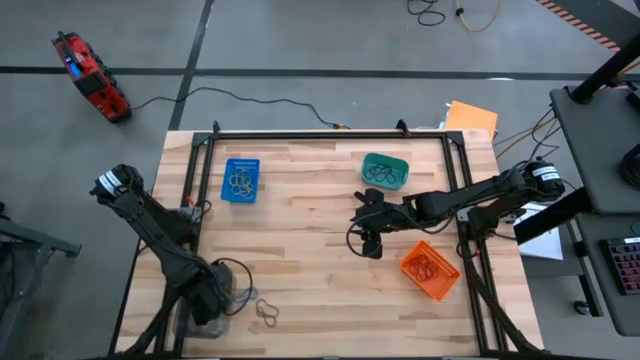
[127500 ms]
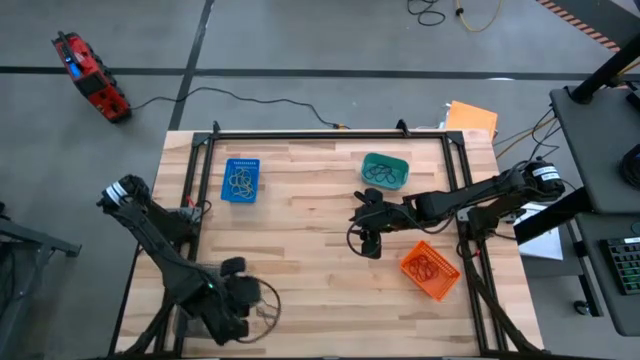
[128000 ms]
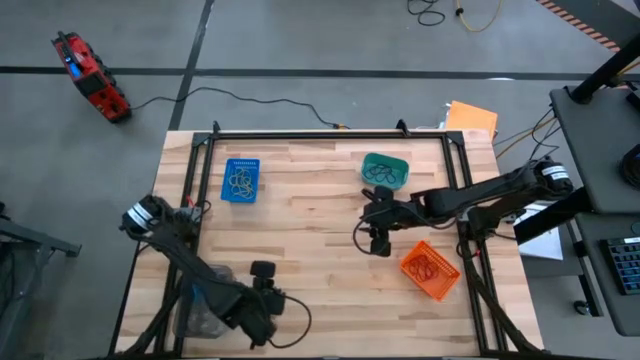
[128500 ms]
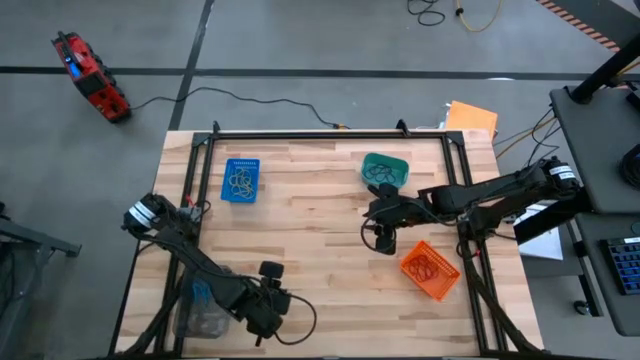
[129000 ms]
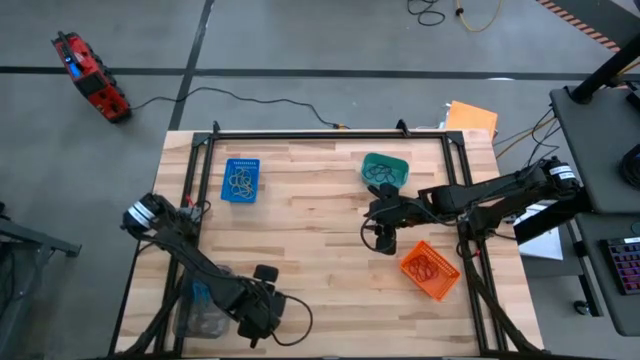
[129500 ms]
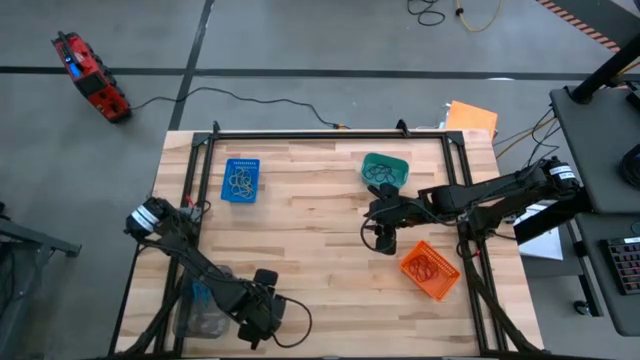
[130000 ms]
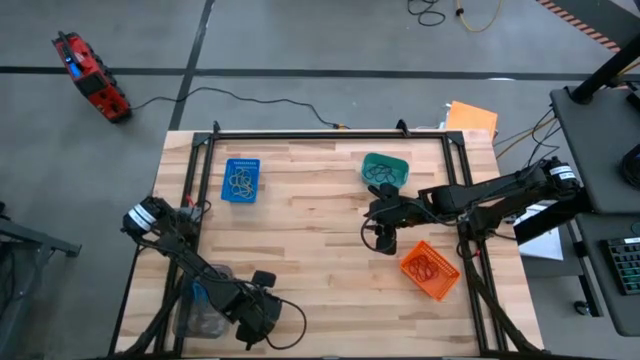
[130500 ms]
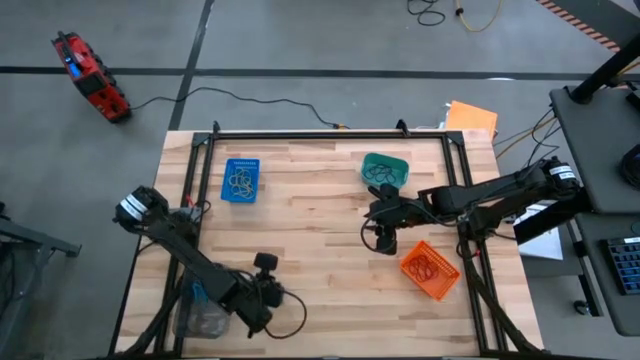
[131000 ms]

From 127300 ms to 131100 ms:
Task: Sort rubber bands into baskets
Put the violet rubberband into the green bin

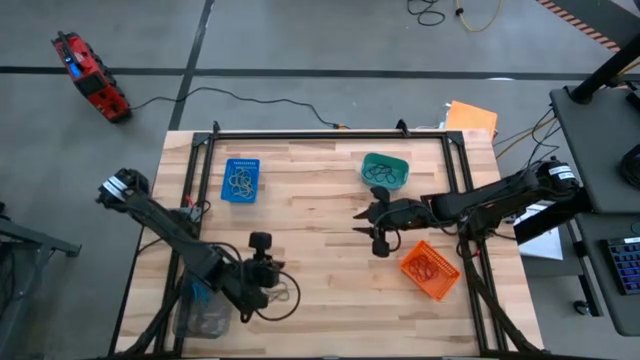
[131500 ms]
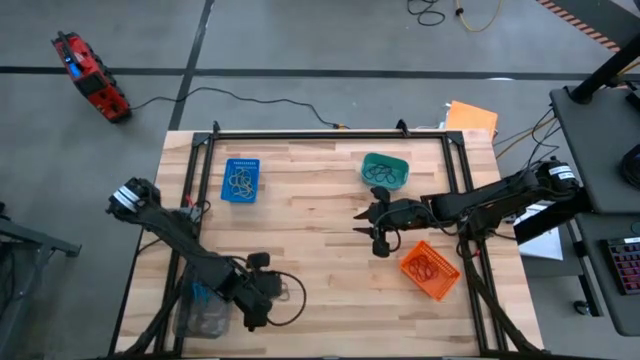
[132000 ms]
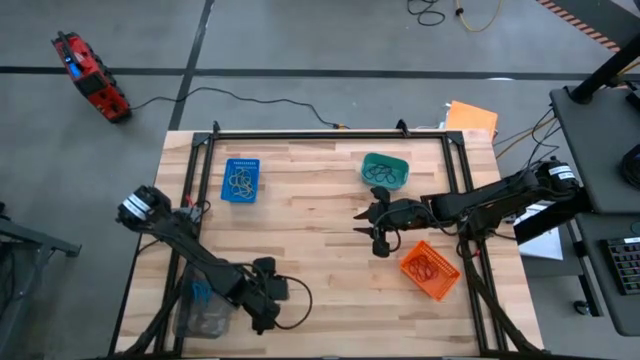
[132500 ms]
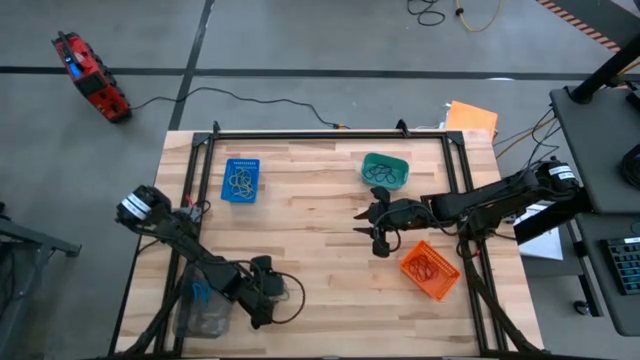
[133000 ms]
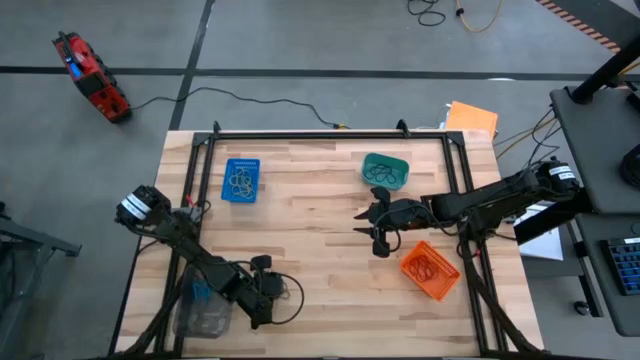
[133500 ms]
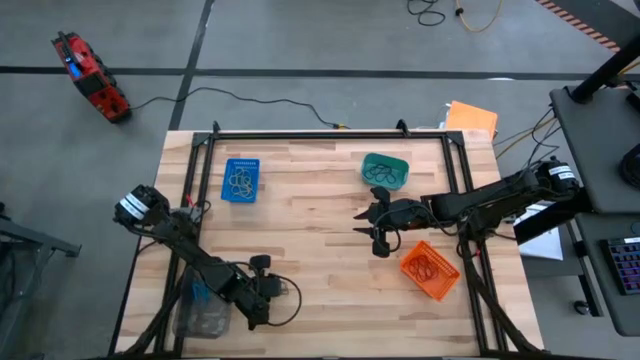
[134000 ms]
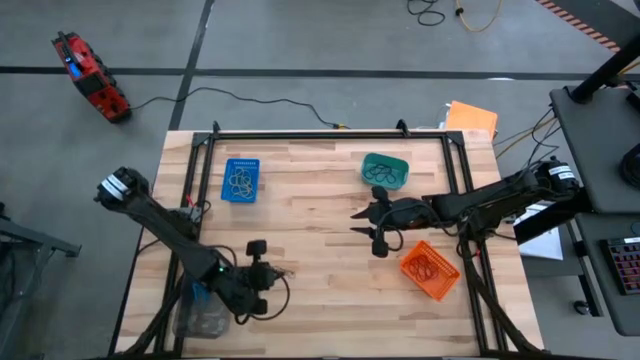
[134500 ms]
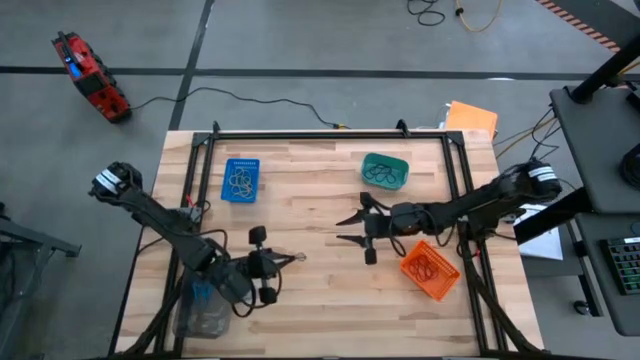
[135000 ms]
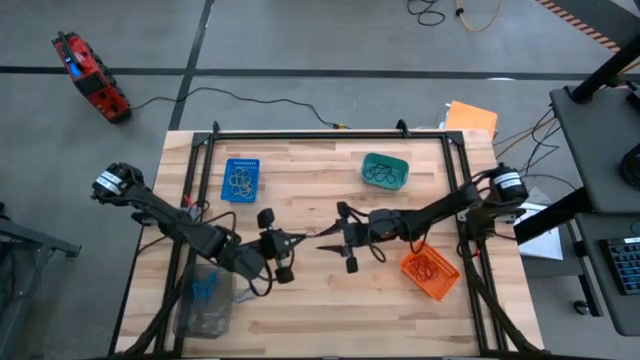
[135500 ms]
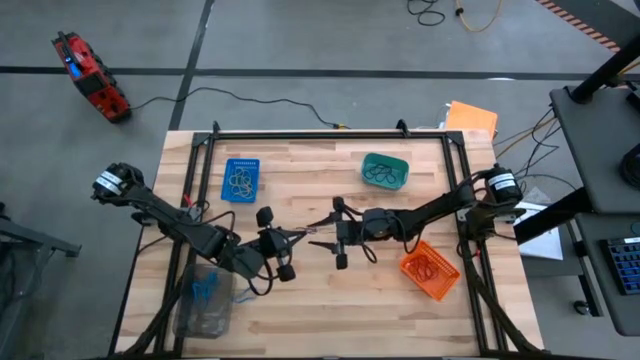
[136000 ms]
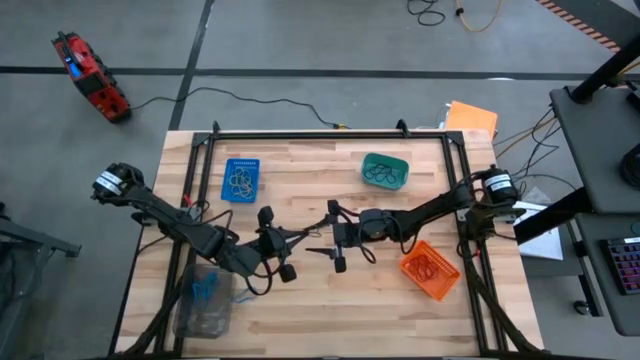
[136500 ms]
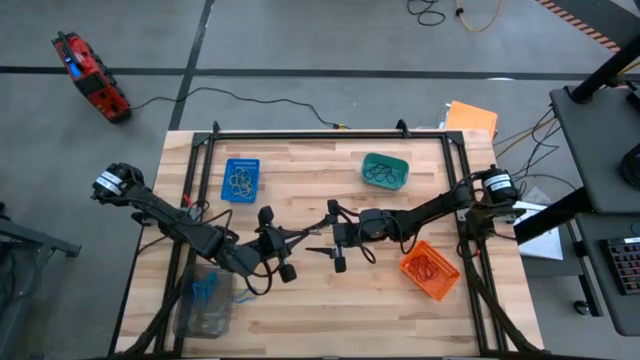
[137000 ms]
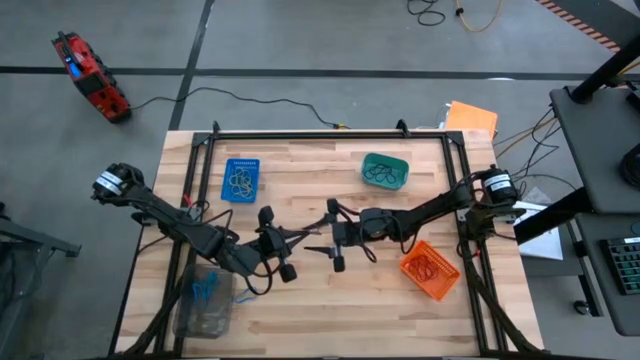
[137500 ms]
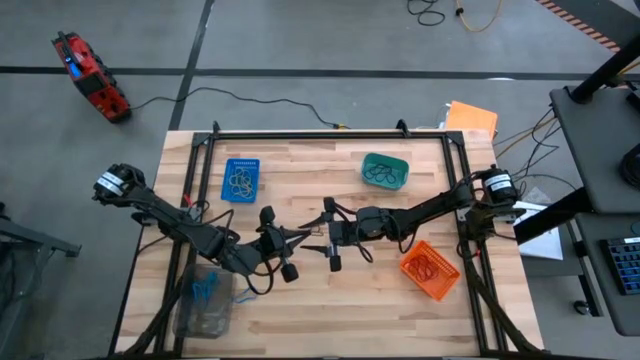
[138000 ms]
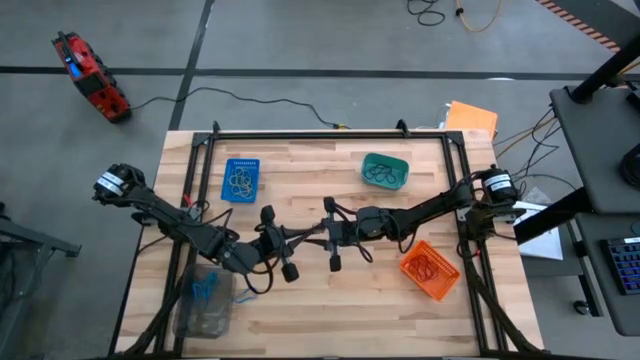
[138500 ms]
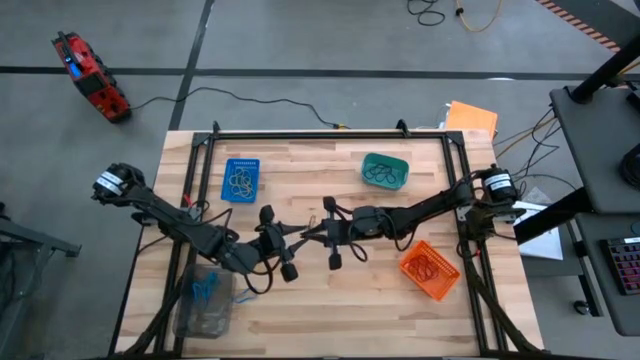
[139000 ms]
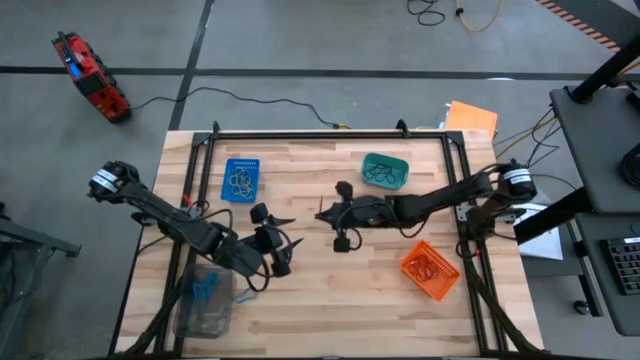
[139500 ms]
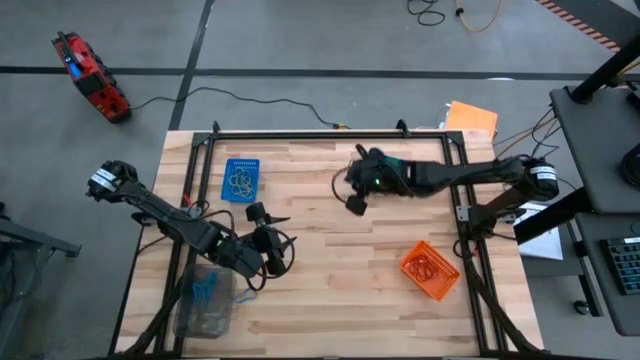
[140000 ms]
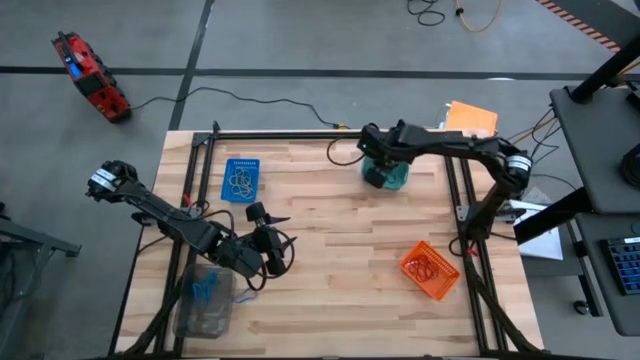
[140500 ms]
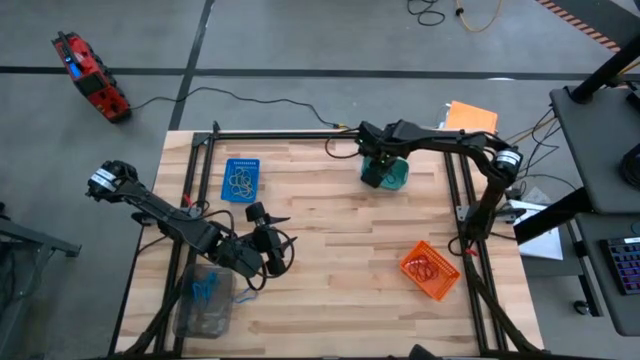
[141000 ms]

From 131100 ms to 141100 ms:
Put the violet rubberband into the green bin

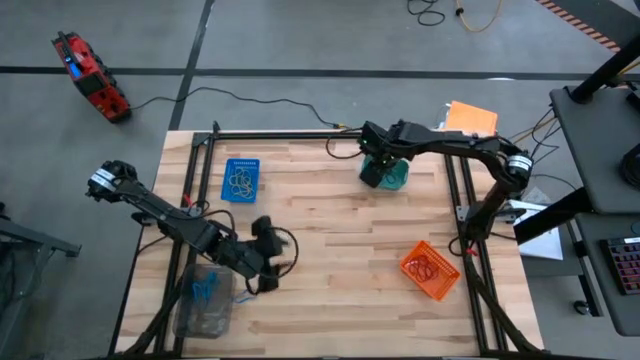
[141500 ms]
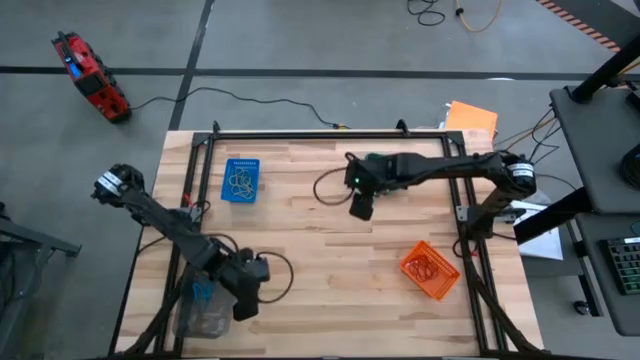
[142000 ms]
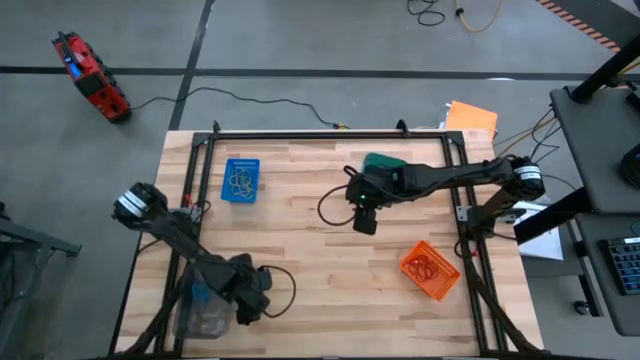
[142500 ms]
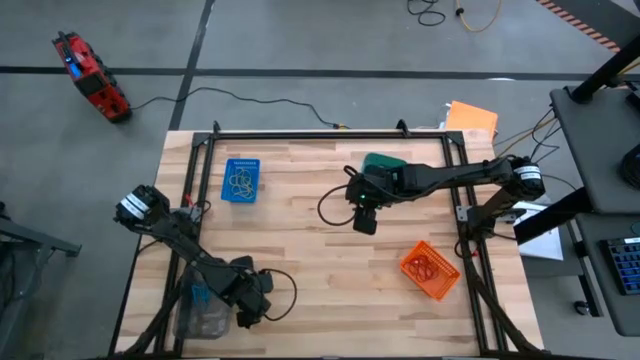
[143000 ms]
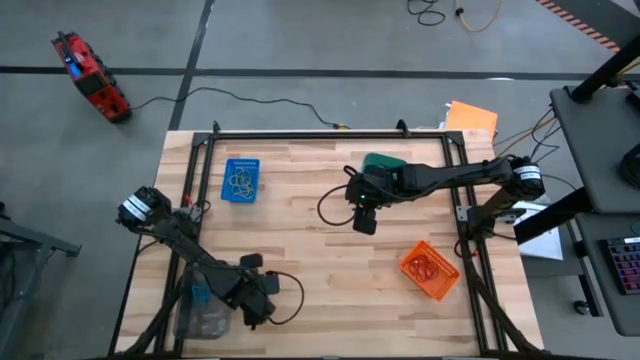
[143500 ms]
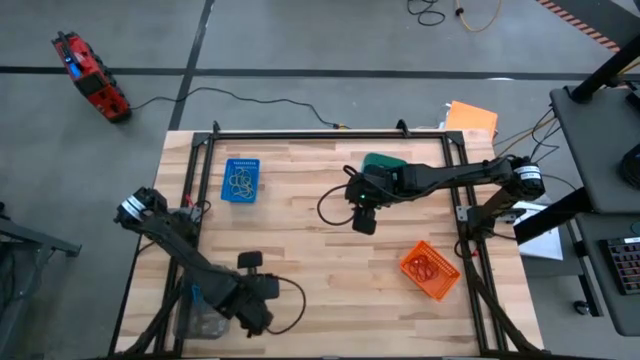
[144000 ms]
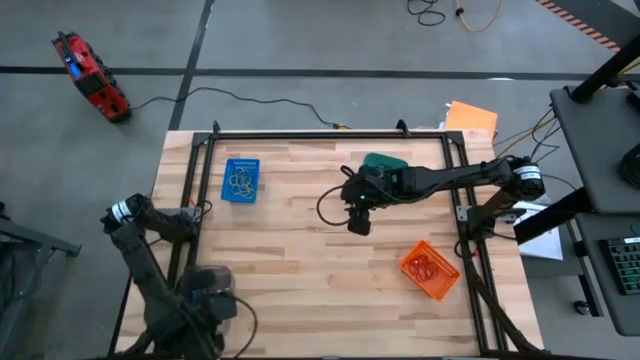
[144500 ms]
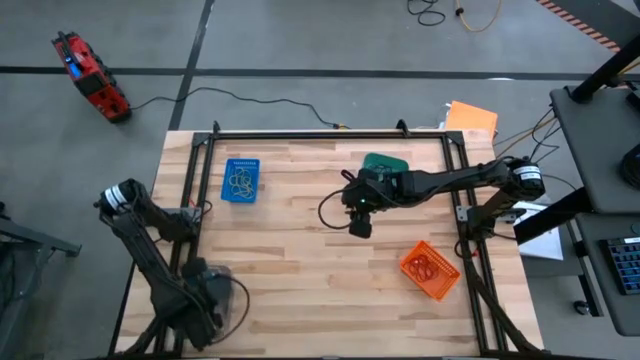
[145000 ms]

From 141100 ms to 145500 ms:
Put the blue rubberband into the black bin

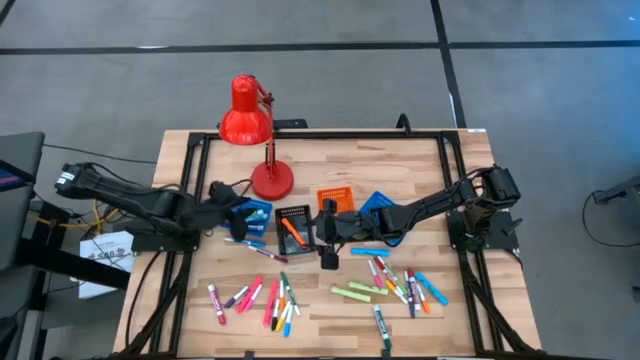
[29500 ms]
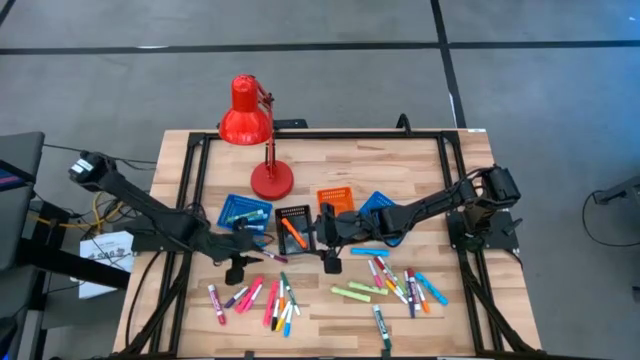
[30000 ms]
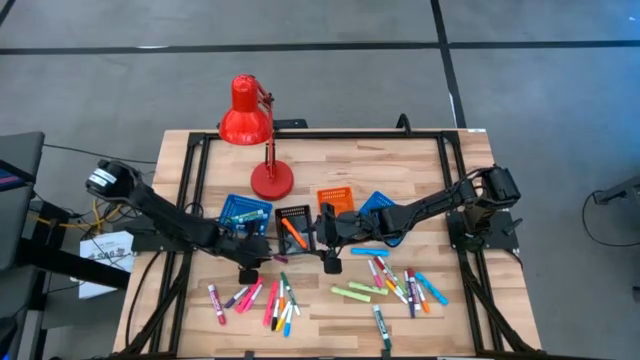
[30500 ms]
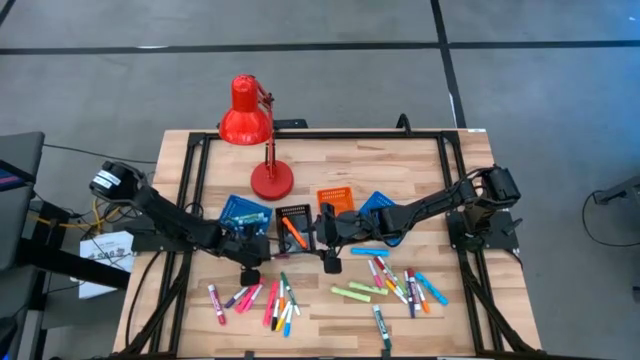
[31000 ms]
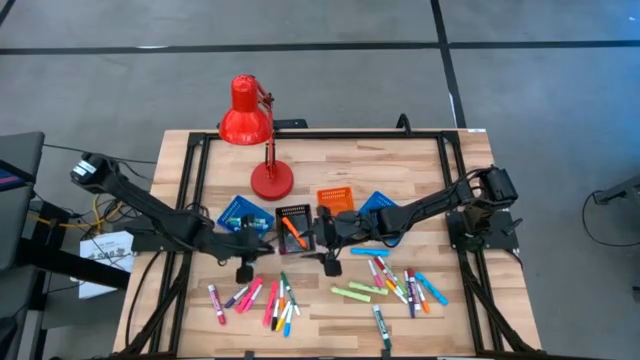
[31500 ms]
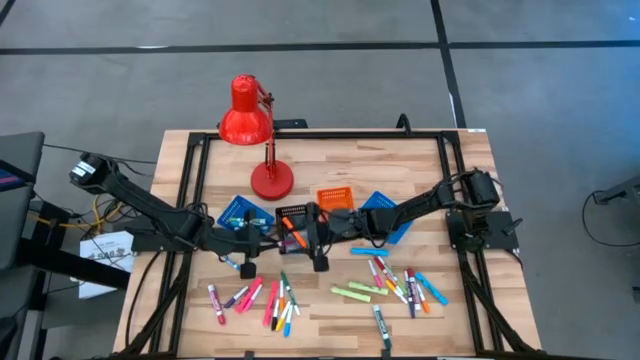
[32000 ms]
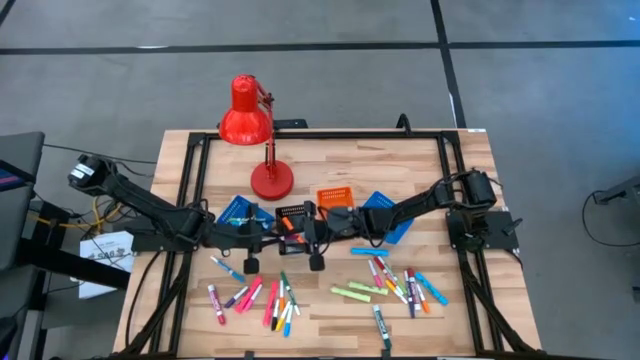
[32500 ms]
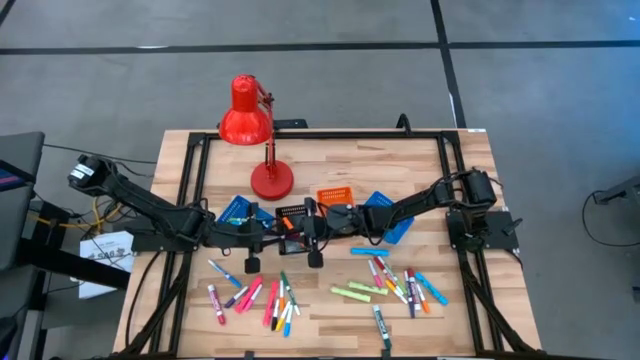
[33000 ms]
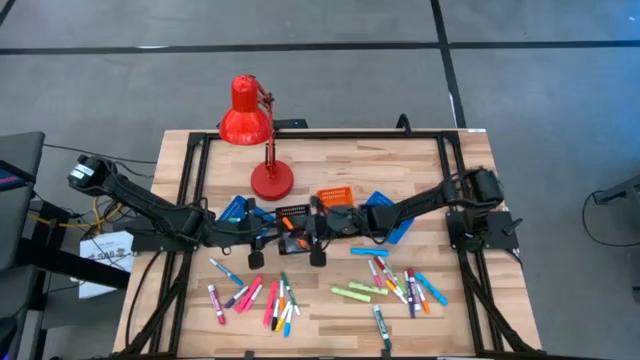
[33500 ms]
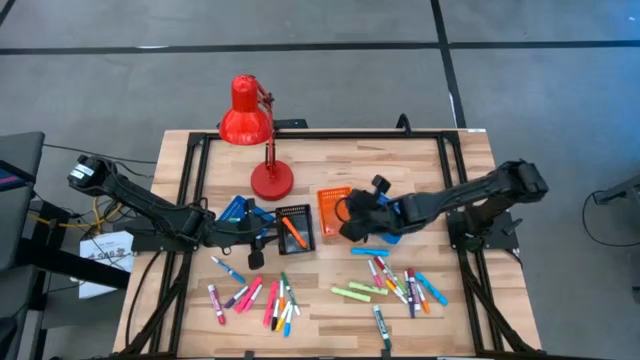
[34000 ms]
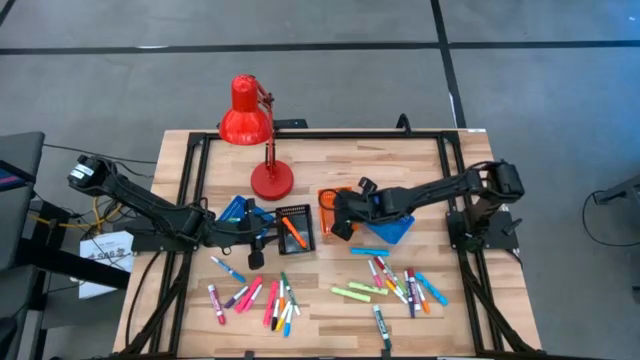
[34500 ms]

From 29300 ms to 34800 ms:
Task: Pick & Place Markers
Put the small dark red marker pen into the orange basket
